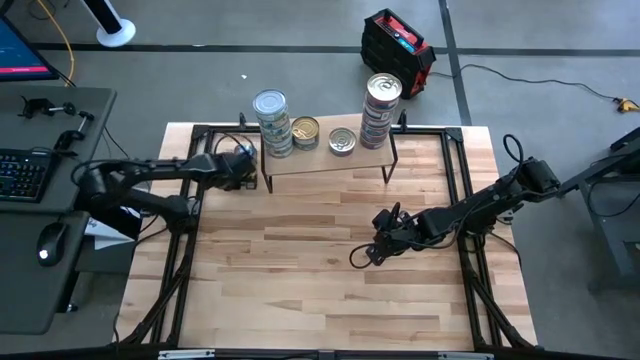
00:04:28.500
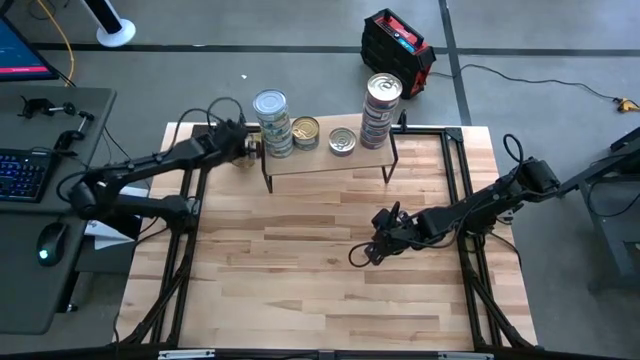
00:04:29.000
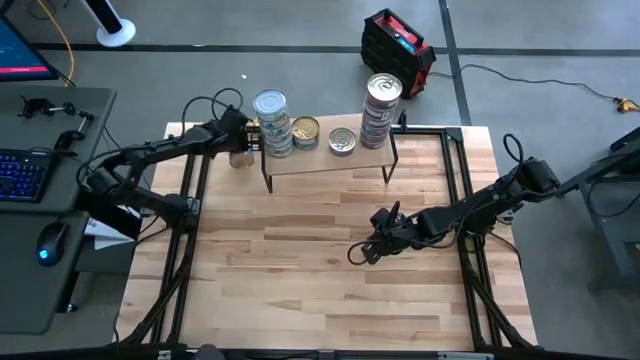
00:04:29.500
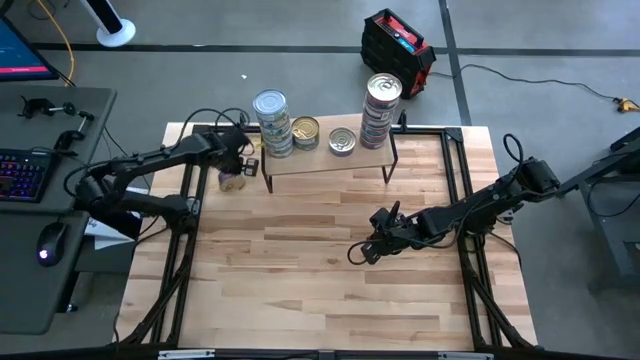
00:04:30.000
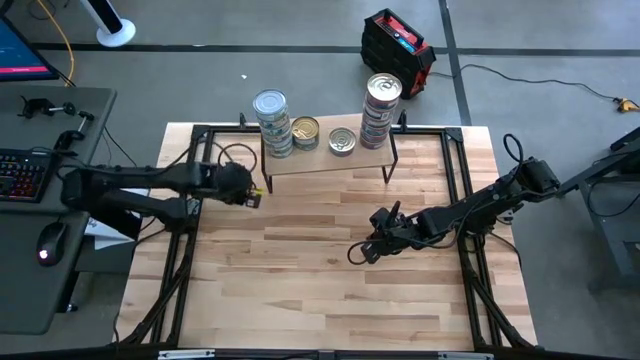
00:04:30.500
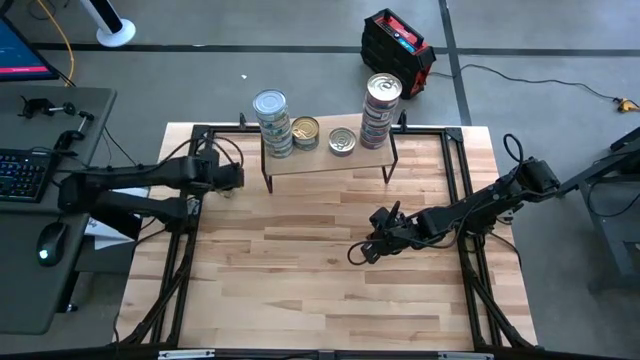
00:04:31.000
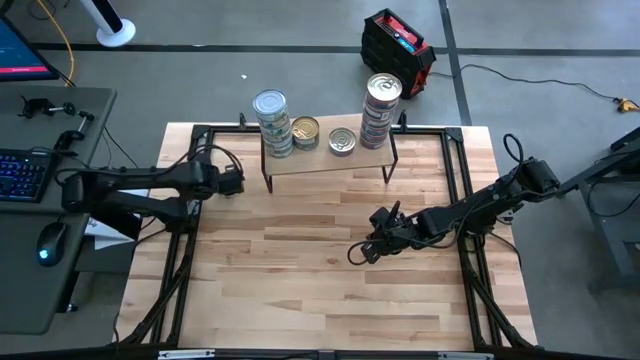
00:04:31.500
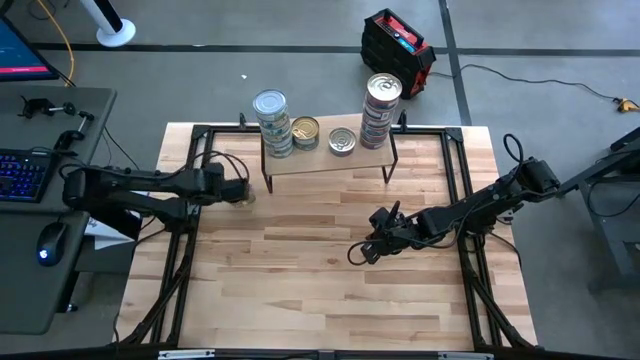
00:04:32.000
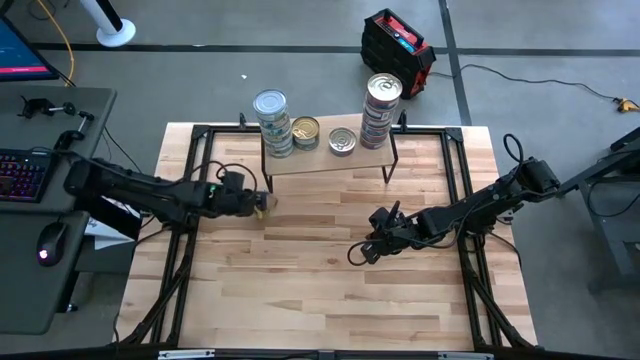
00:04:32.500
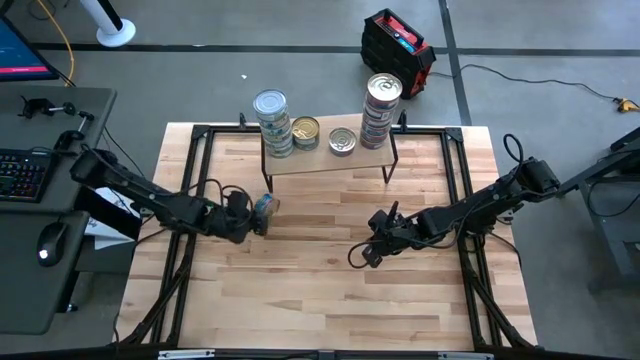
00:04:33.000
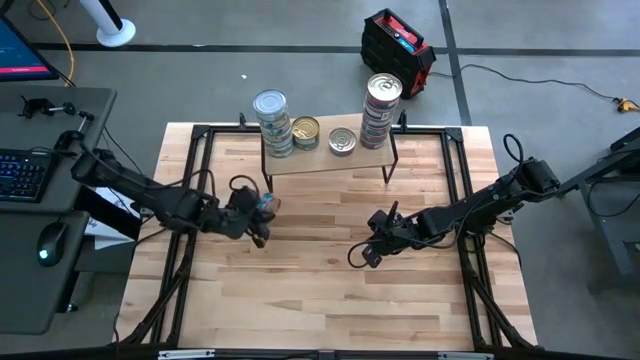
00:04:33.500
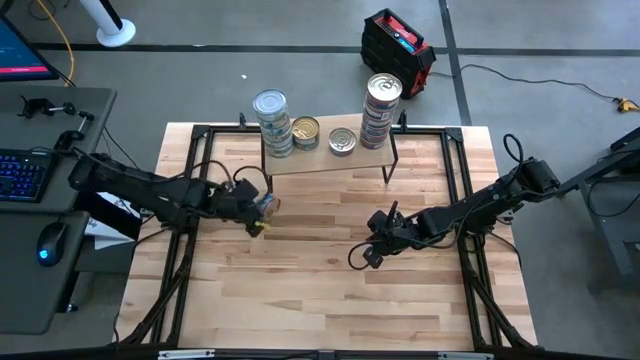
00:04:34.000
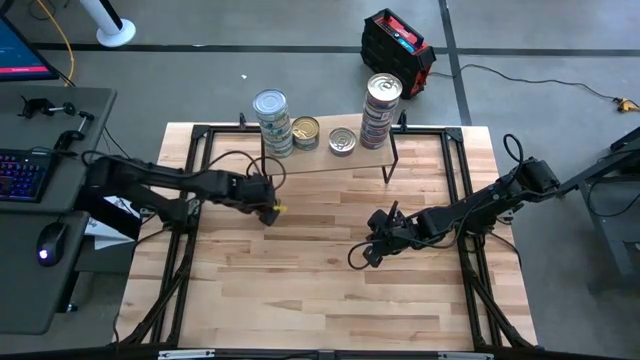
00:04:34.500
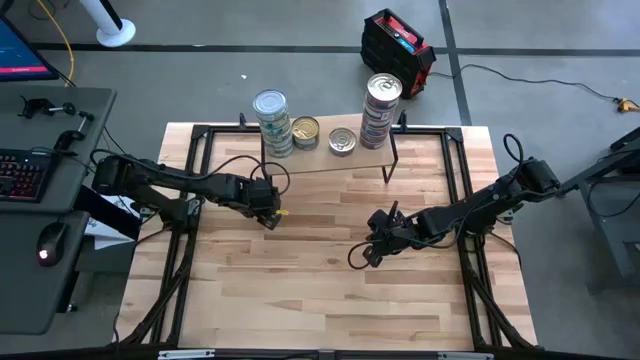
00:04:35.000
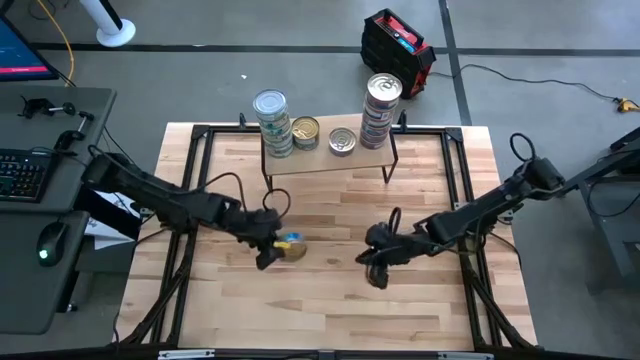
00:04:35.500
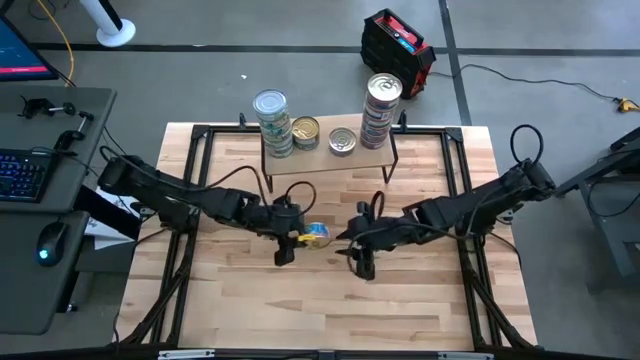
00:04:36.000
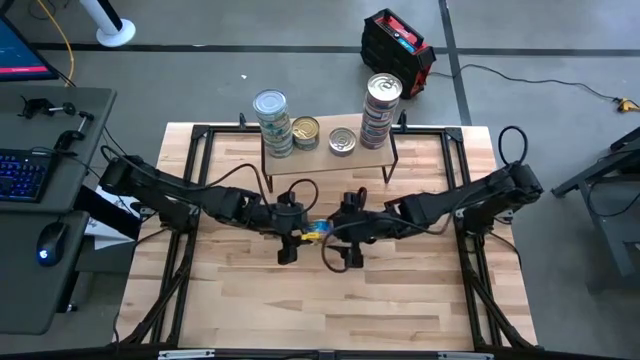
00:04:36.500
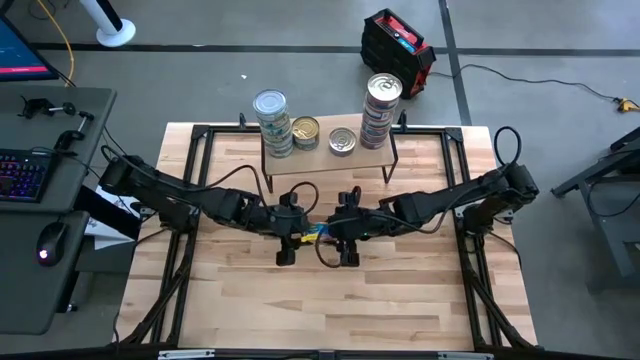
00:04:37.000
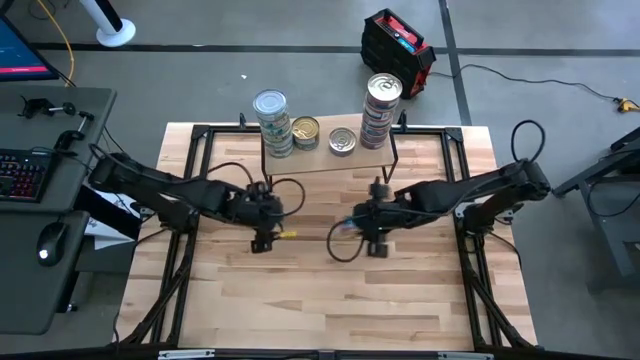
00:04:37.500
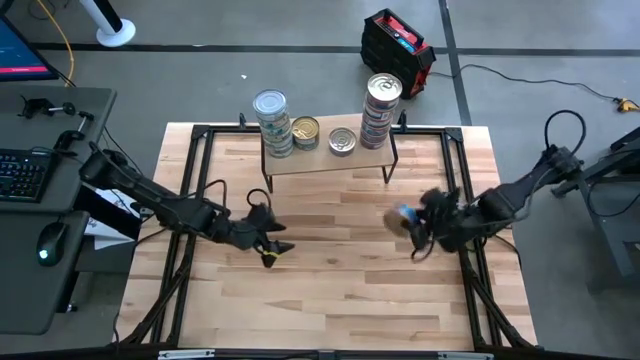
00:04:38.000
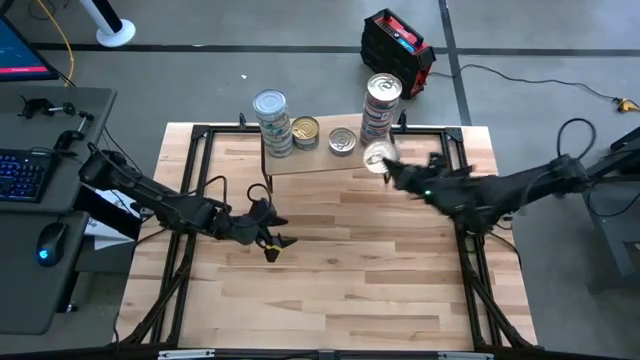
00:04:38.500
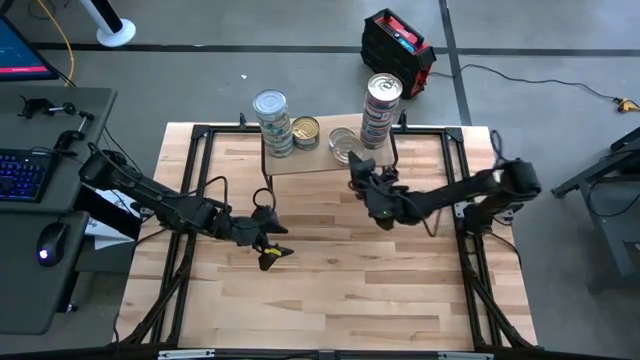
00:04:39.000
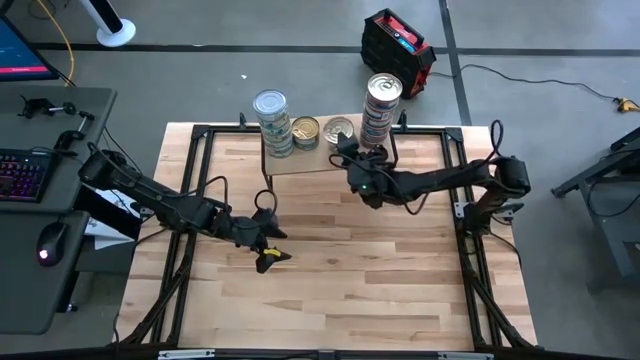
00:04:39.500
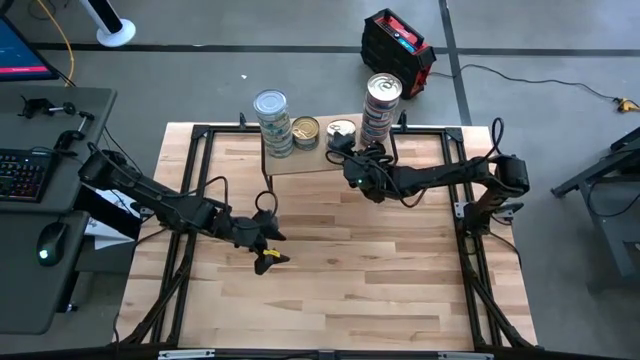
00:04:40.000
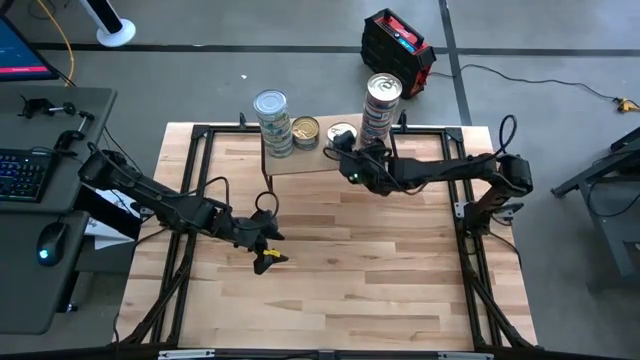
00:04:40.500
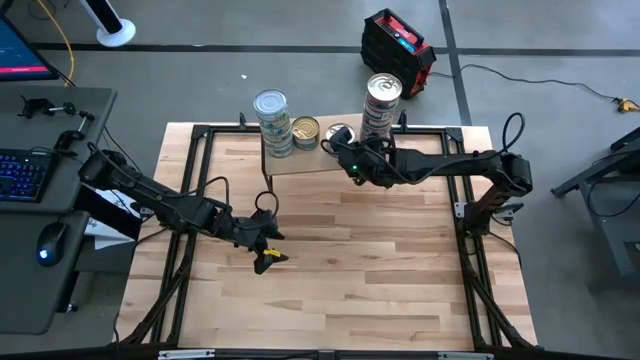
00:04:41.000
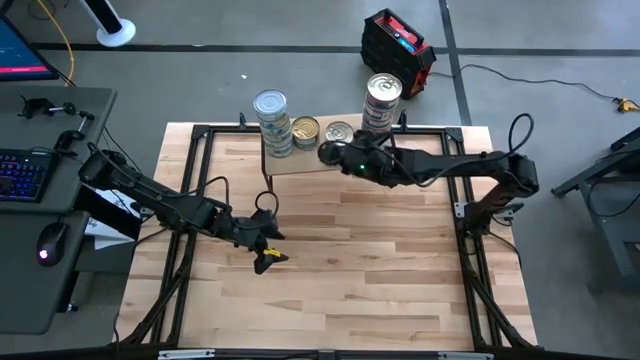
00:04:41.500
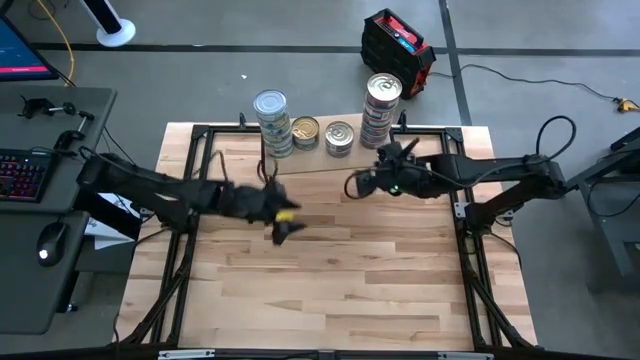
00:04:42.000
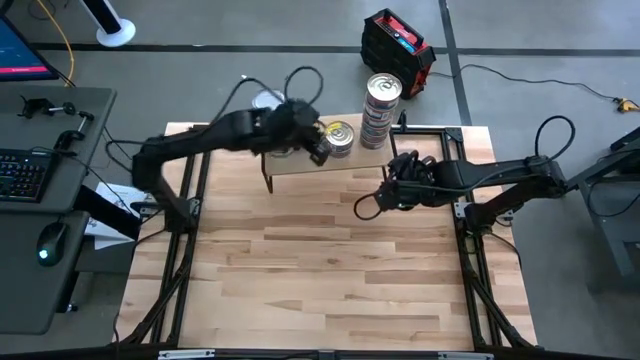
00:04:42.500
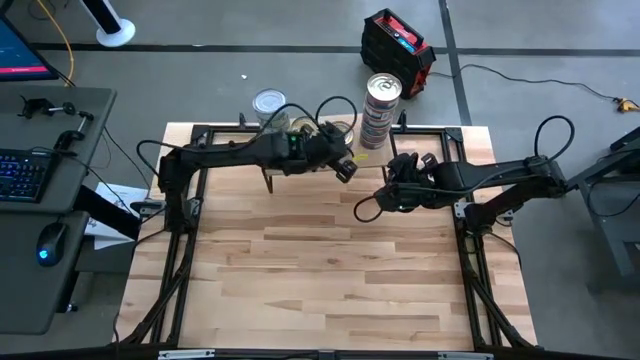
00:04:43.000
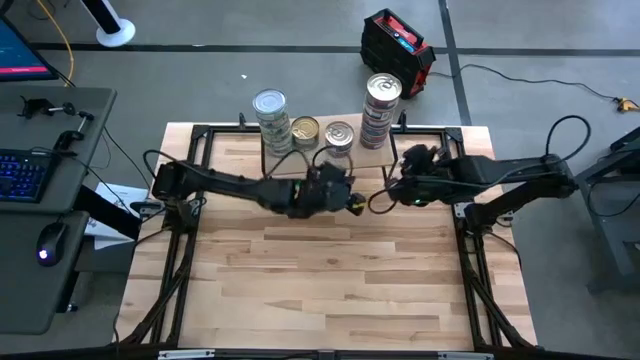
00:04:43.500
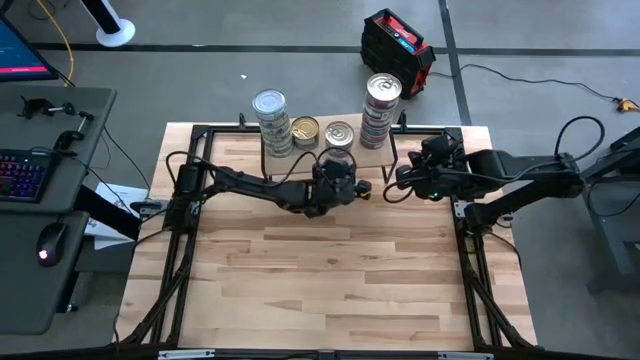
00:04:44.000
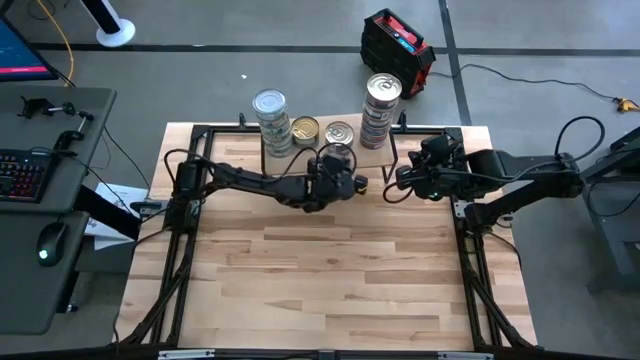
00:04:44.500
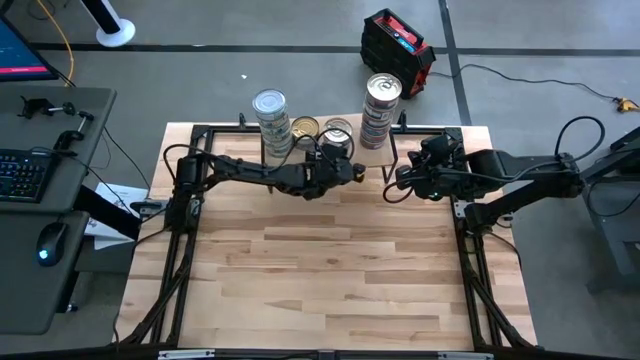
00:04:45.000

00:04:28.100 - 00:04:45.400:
Task: Stack canned seafood by type on shelf
Stack the blue pink tuna can on top of the other blue pink tuna cans on the shelf

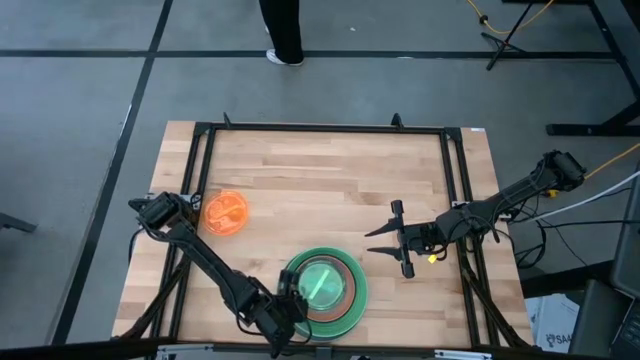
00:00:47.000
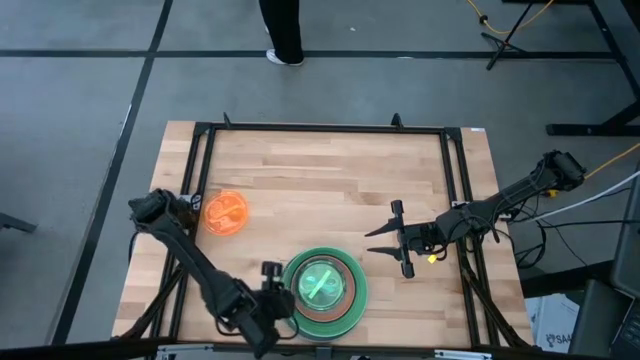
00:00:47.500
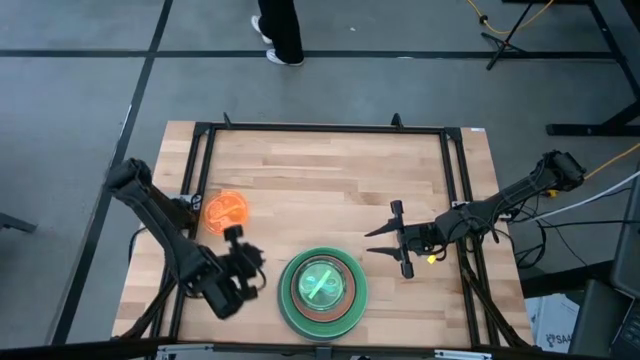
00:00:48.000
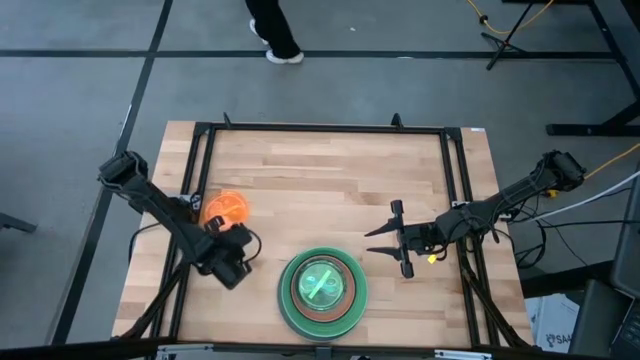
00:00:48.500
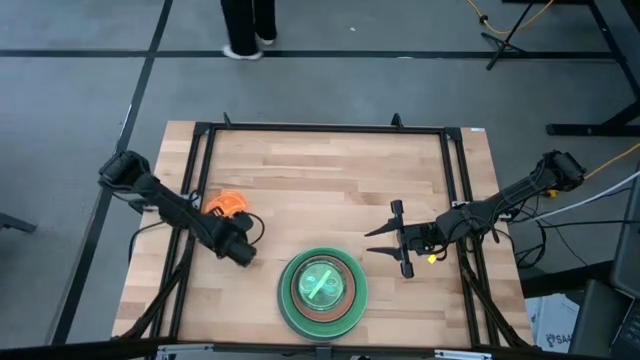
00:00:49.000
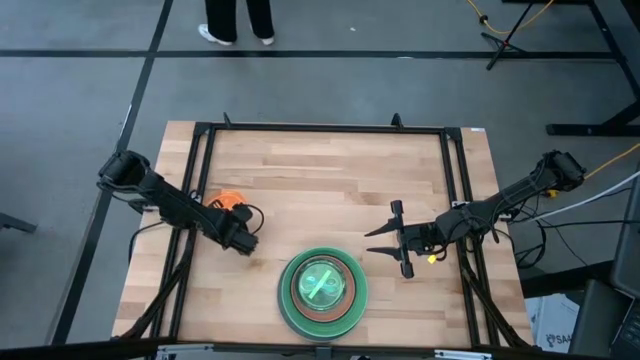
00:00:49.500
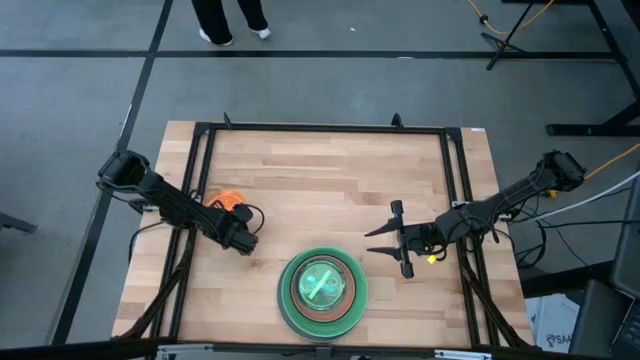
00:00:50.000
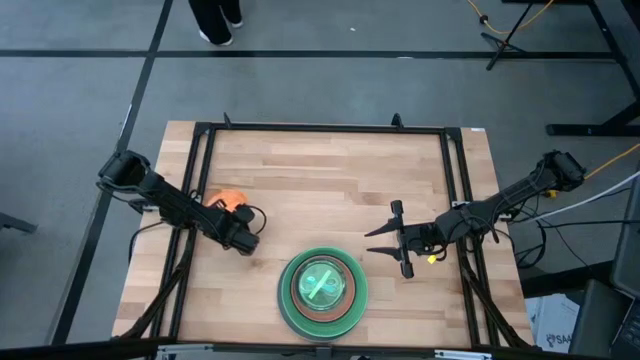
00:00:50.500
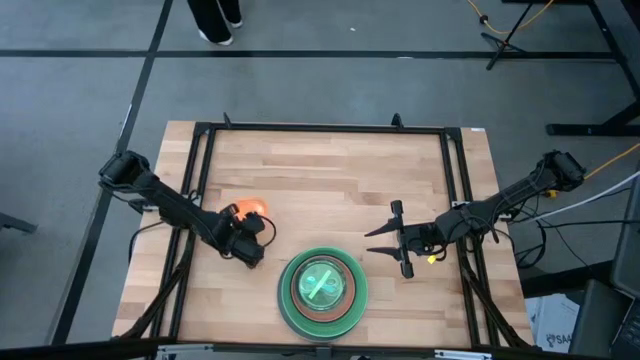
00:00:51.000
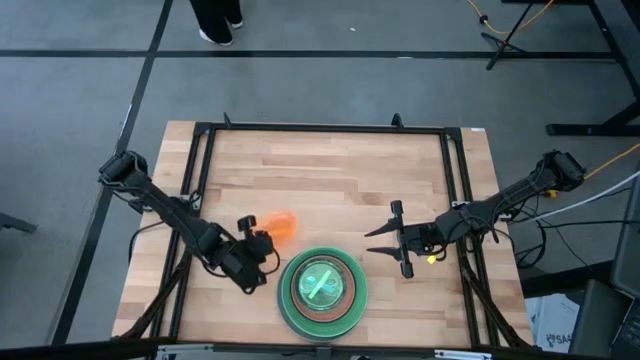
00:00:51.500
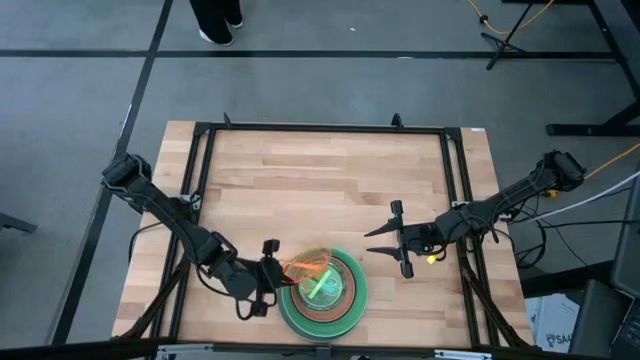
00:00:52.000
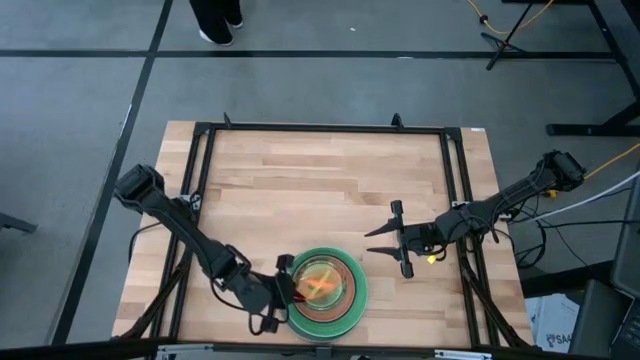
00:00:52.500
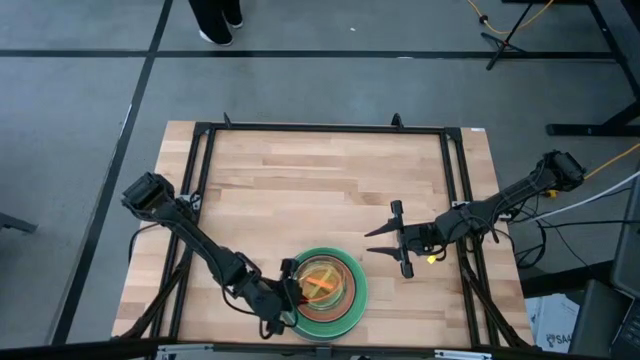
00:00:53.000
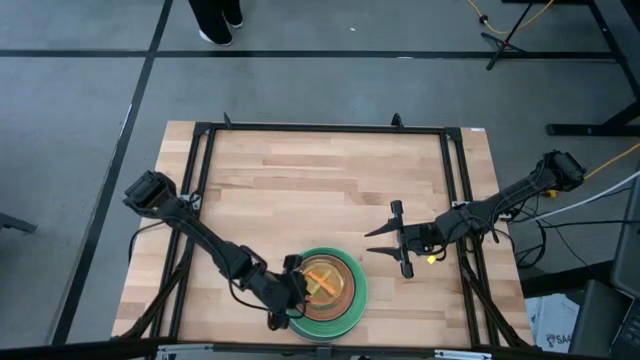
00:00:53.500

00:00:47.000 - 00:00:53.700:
Task: Stack plastic plates
Stack the orange plate on top of the light green plate
